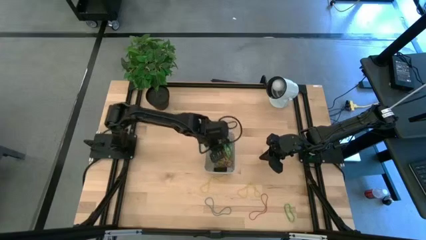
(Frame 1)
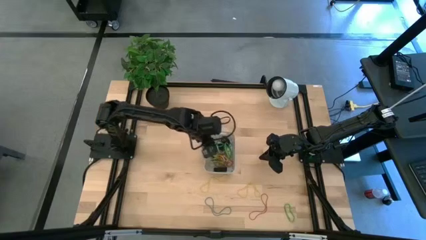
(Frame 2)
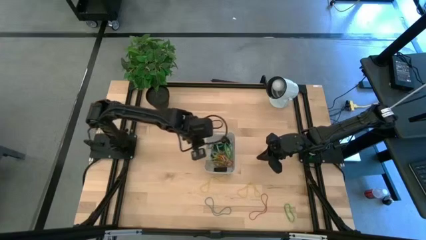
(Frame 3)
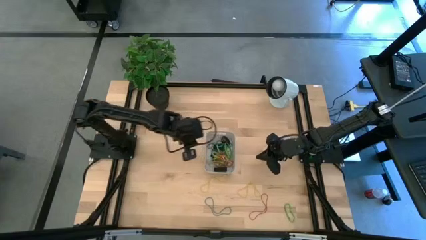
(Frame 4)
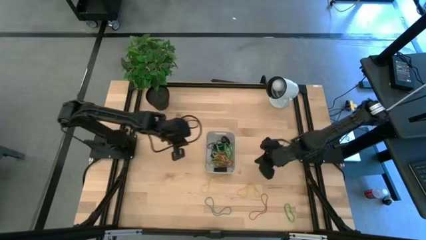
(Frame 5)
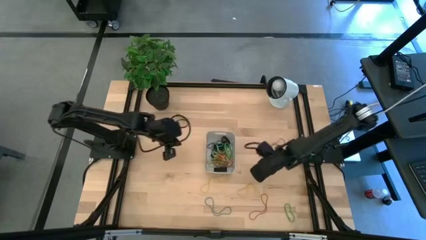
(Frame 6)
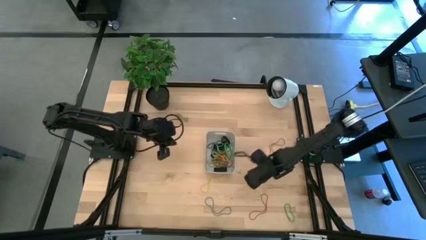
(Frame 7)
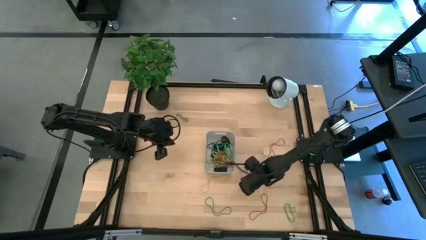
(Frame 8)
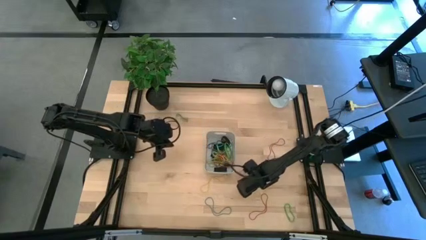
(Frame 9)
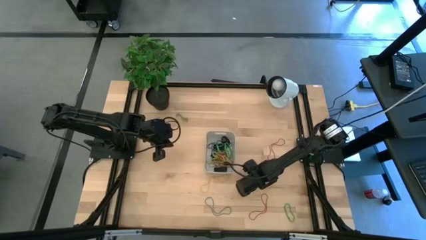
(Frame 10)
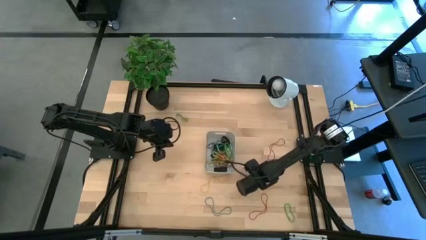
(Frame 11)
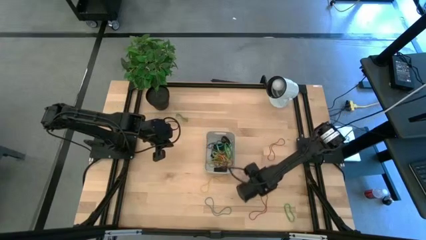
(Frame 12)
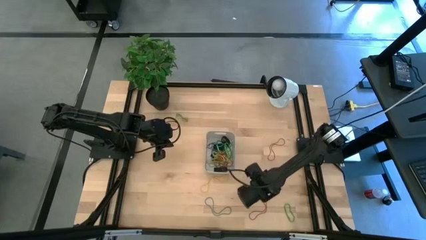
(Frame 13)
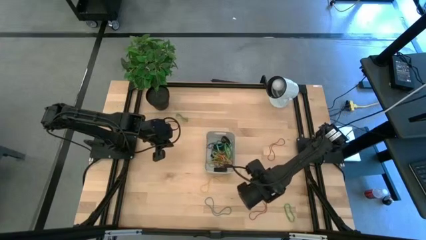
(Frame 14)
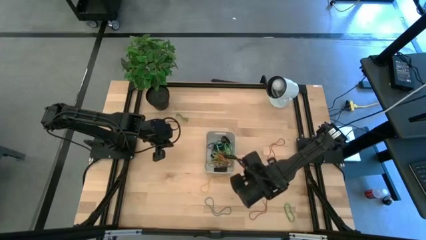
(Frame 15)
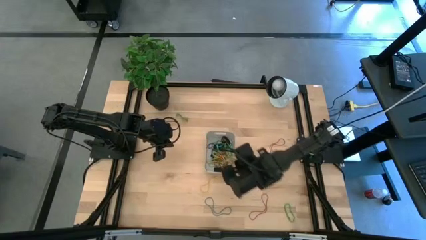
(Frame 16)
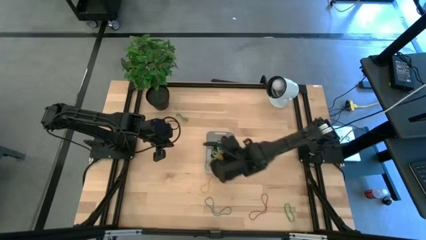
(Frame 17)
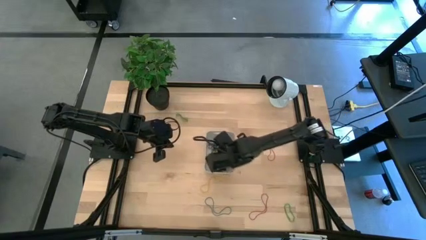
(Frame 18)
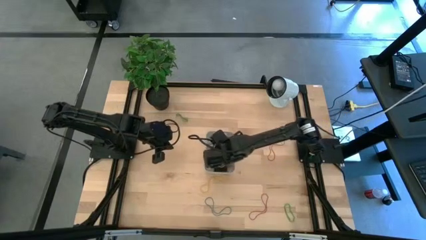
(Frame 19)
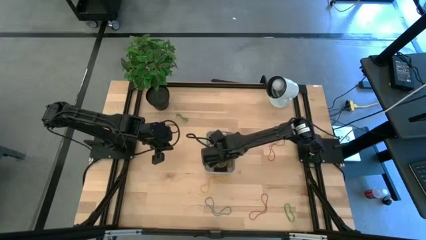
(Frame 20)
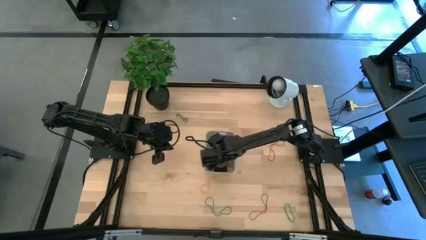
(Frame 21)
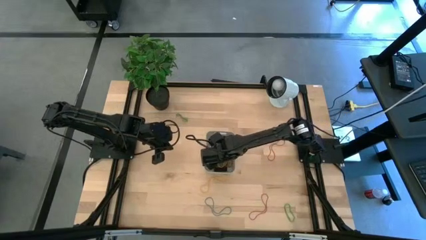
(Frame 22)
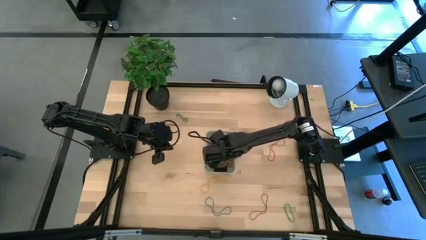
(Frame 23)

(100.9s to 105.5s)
Task: Pick and place rubber bands into bin
Put the yellow rubber band into the gray bin

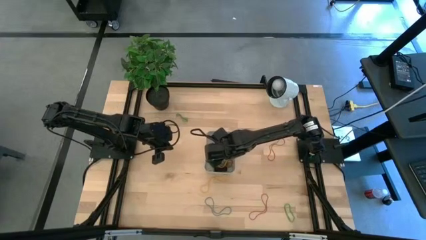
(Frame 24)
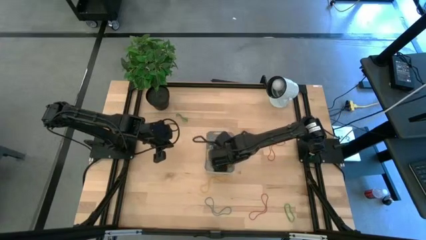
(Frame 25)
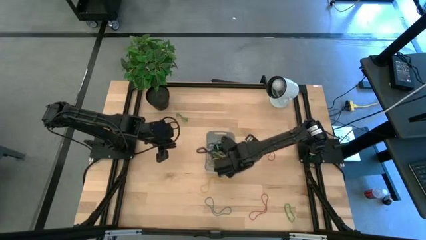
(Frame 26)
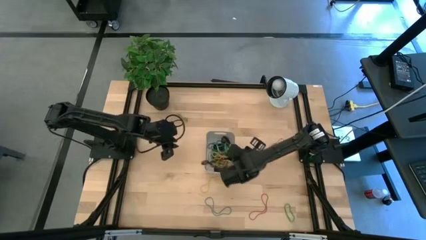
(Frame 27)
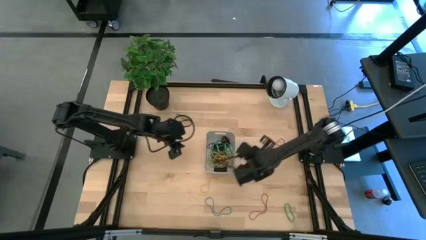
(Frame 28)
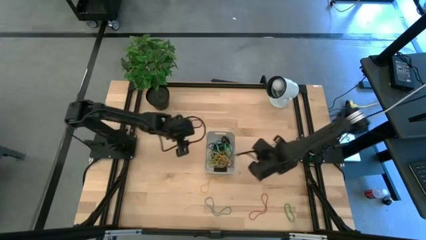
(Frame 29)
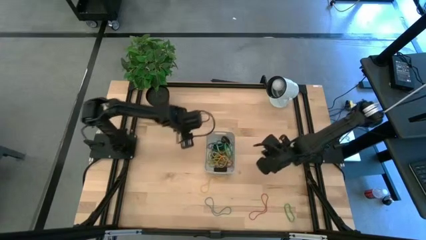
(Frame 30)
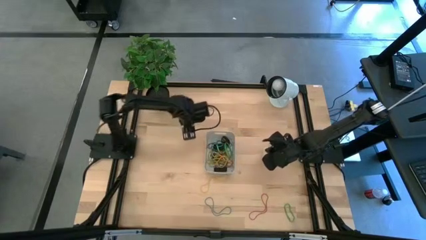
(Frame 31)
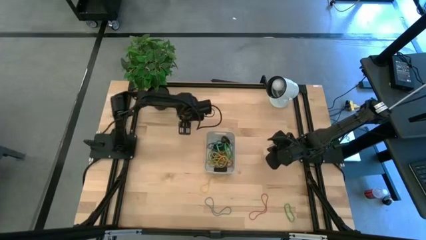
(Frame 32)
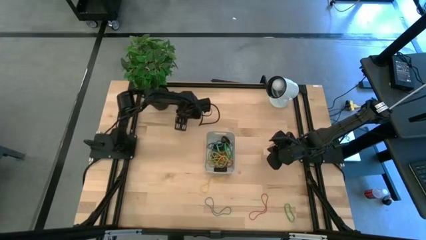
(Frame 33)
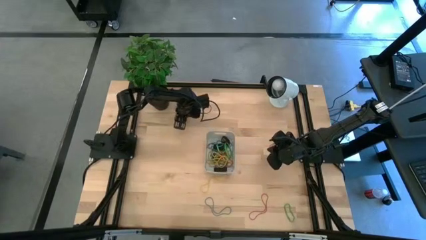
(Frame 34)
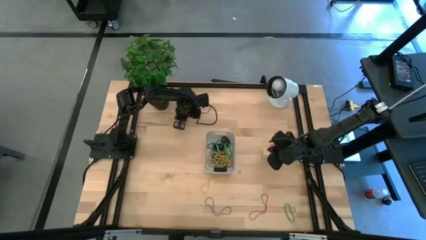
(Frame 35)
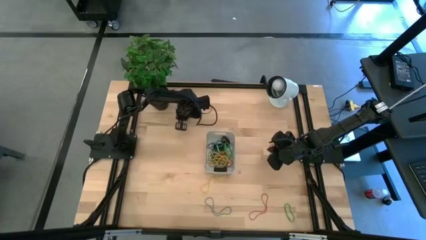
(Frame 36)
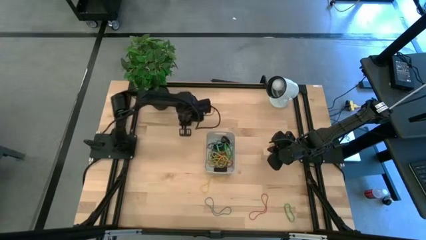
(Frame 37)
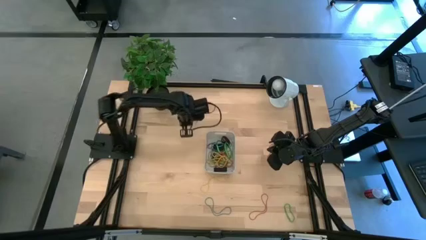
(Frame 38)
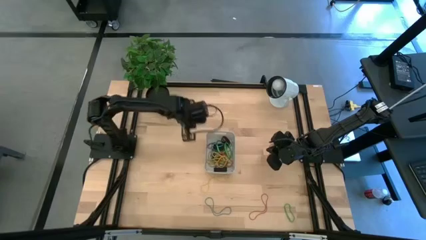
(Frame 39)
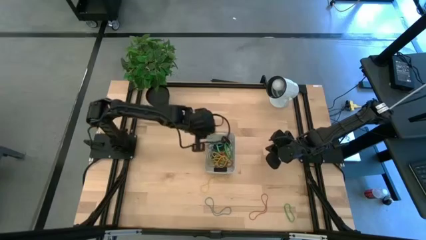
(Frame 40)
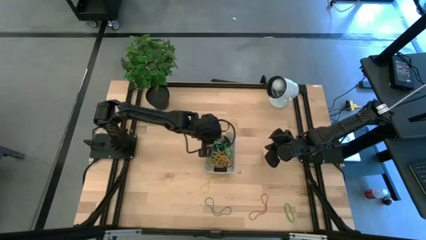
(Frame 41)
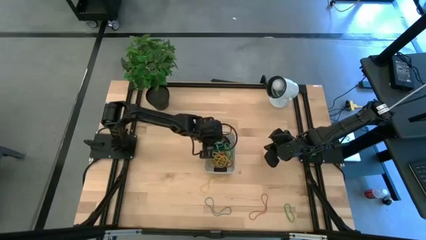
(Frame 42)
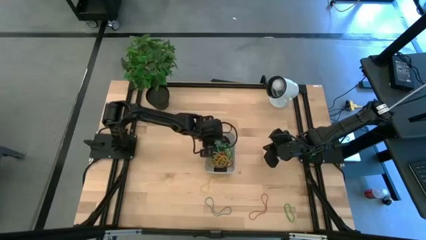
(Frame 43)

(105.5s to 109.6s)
Put the green rubber band into the gray bin

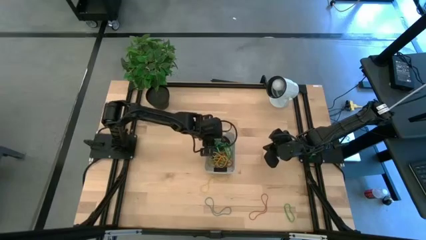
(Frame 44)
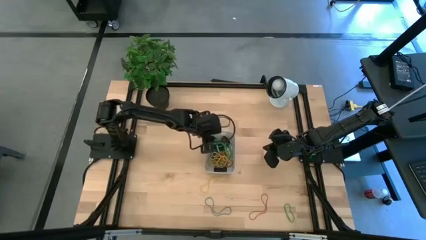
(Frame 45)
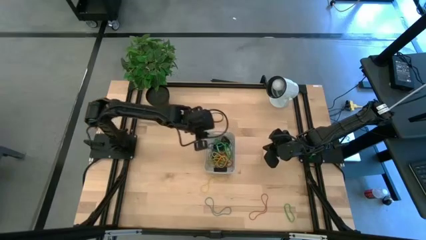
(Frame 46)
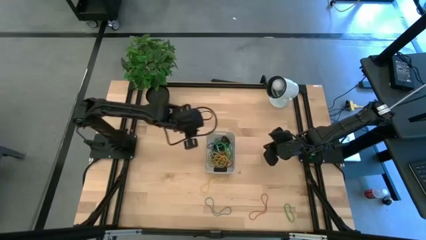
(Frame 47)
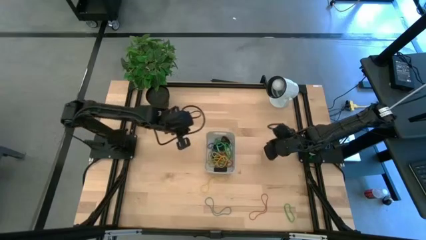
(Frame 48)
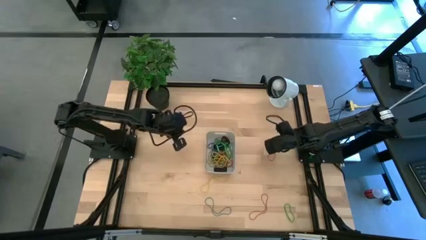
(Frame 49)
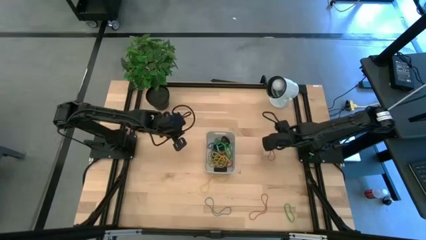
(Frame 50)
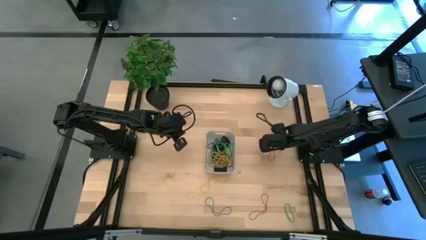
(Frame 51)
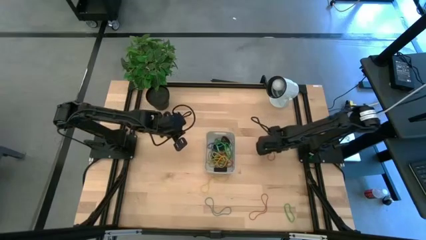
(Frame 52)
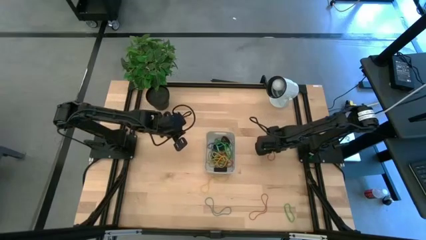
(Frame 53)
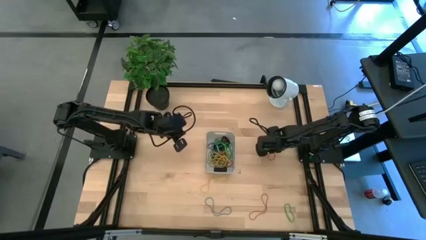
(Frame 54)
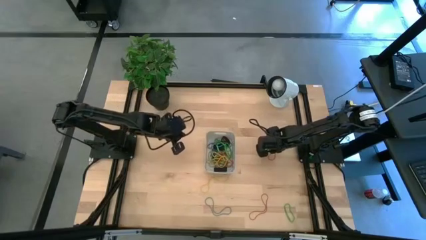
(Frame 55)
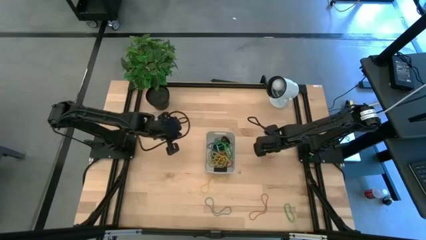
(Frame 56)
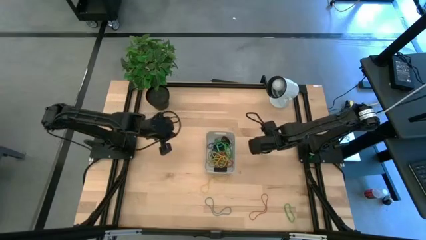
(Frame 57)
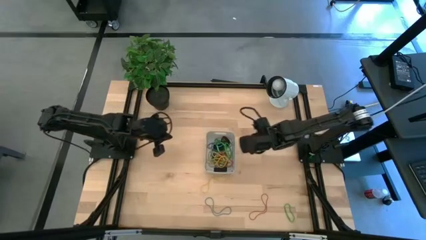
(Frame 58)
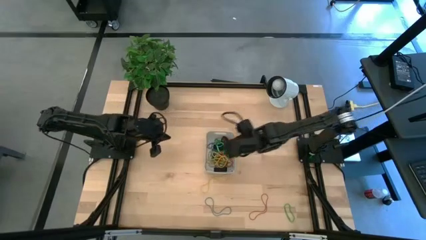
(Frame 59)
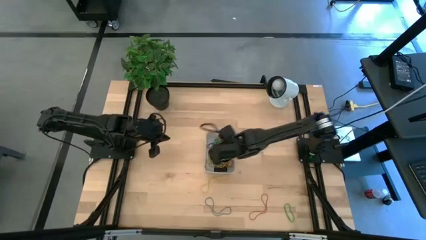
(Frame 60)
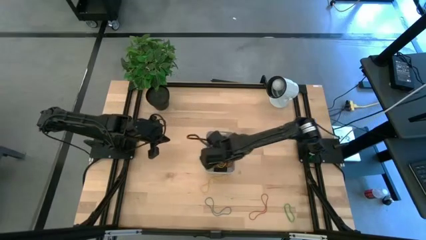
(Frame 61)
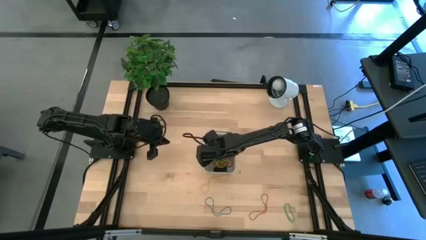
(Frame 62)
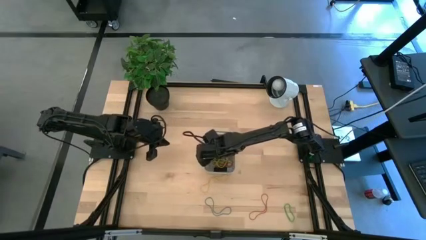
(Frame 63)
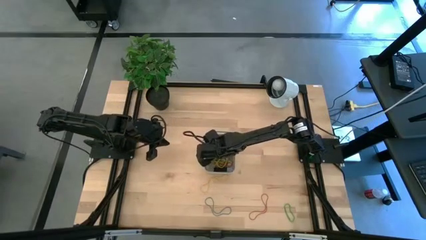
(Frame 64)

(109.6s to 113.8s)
Put the red rubber band into the gray bin

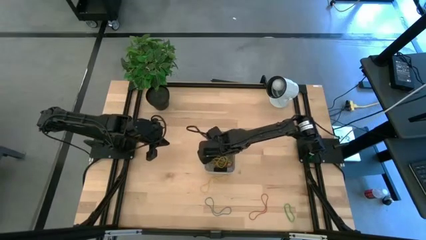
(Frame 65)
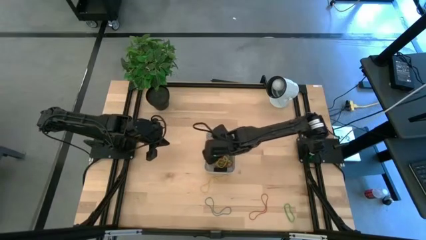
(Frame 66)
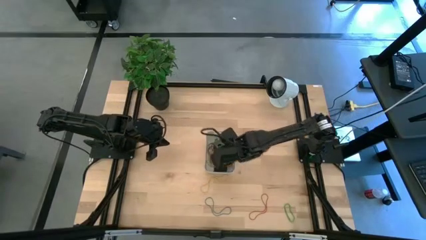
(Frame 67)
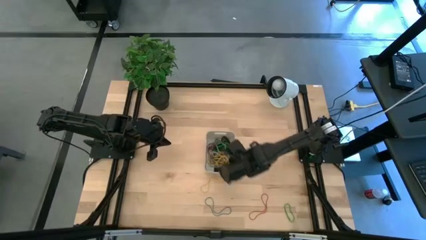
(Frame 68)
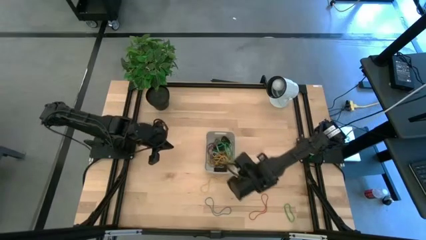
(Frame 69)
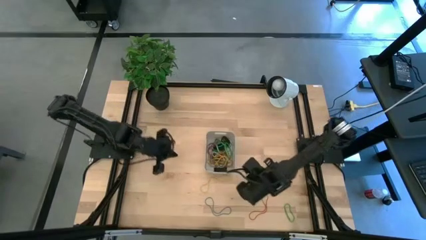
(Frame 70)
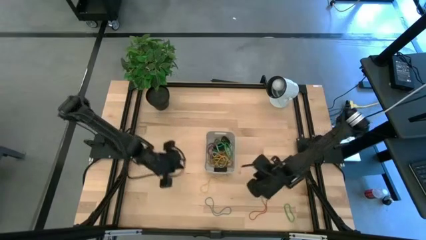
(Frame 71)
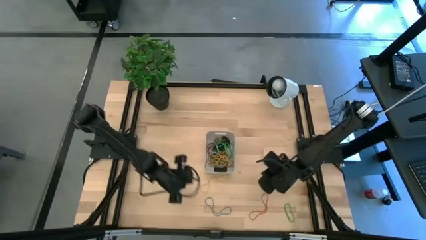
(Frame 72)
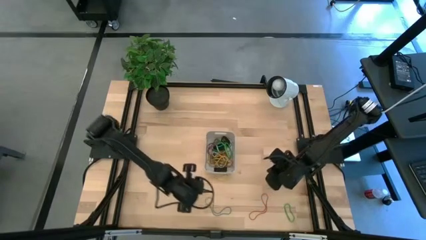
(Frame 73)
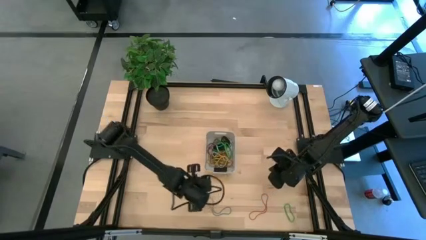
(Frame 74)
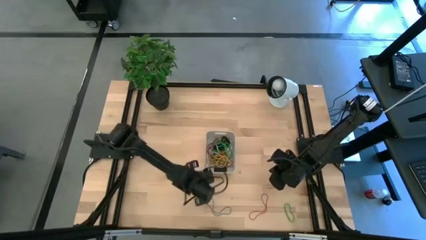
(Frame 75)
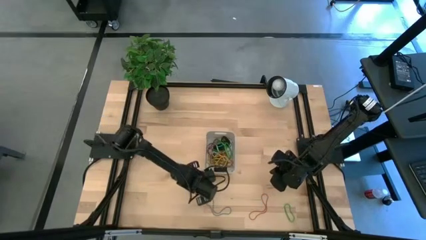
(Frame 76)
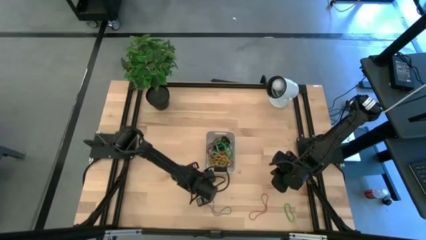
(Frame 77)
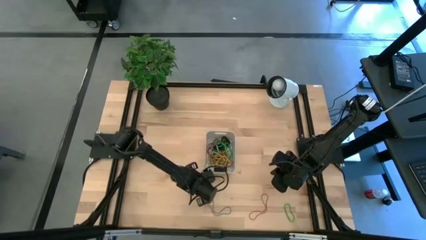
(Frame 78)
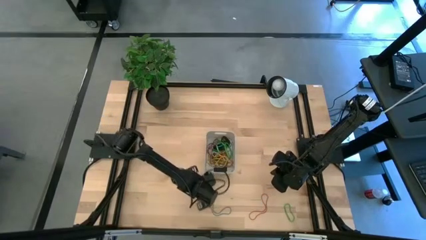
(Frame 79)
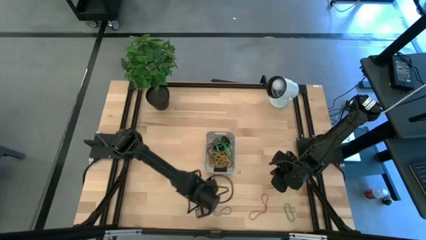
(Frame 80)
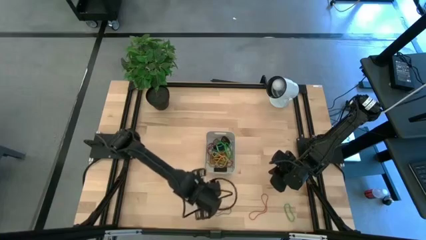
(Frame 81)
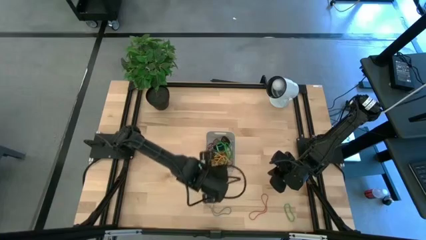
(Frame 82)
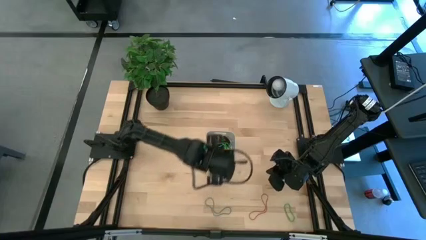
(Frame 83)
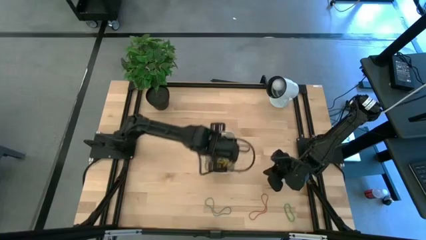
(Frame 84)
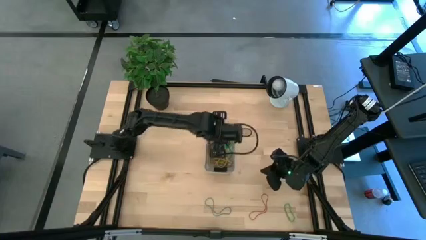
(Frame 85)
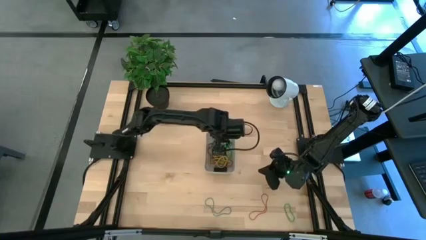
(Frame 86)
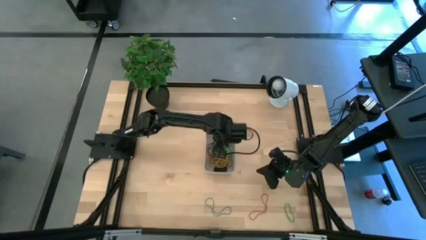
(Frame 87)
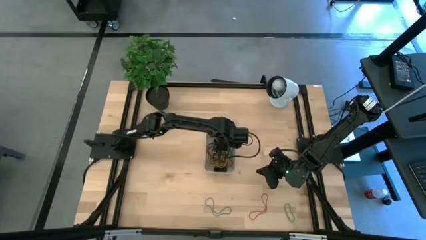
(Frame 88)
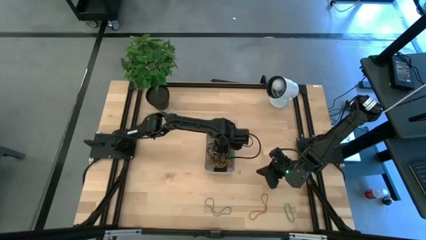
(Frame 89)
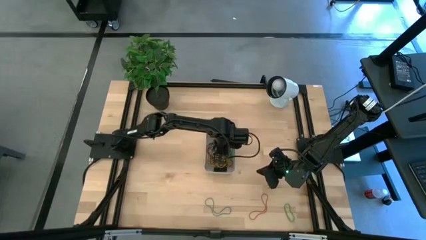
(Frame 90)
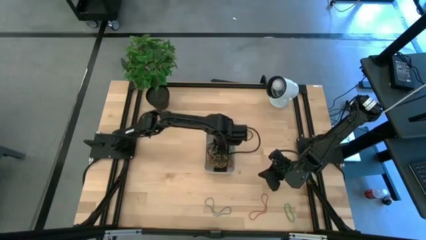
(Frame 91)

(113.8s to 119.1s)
Put the yellow rubber band into the gray bin
